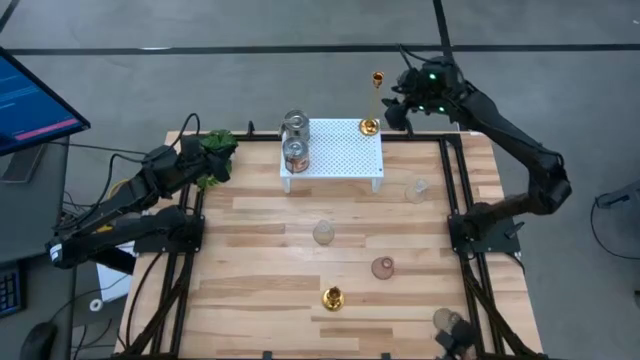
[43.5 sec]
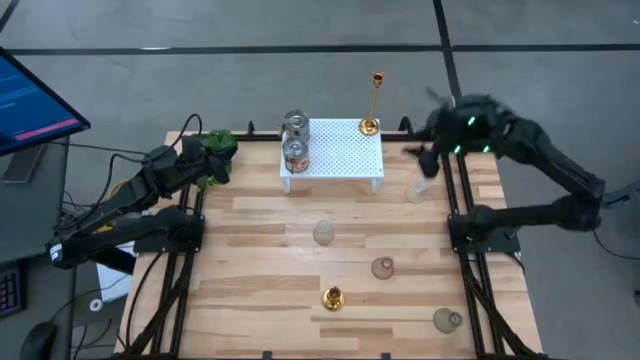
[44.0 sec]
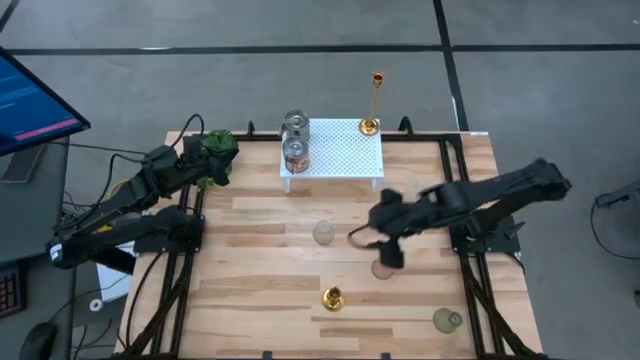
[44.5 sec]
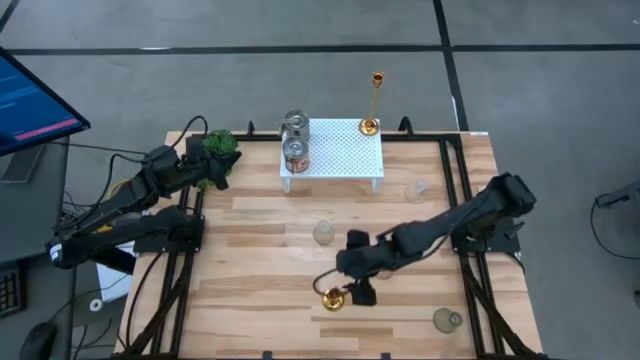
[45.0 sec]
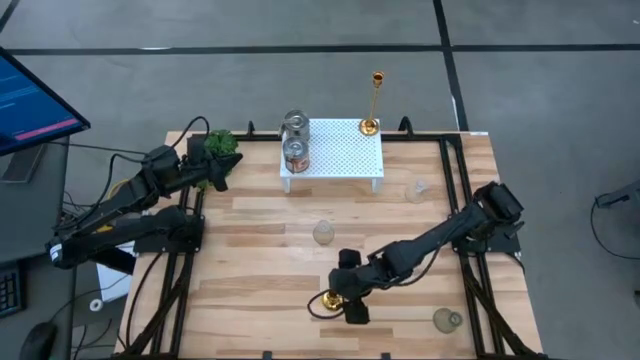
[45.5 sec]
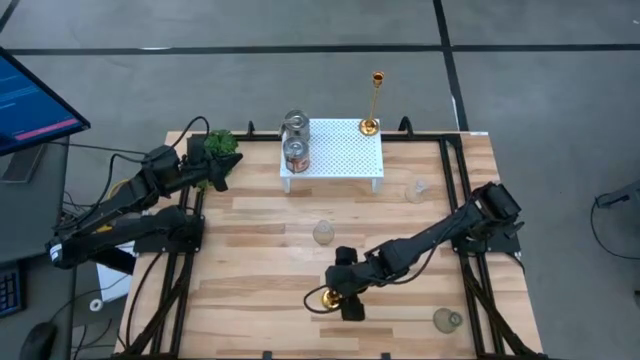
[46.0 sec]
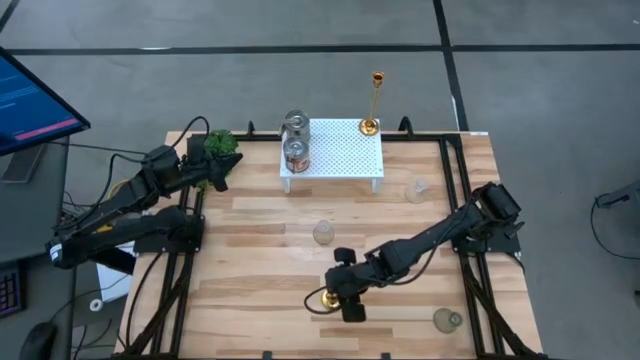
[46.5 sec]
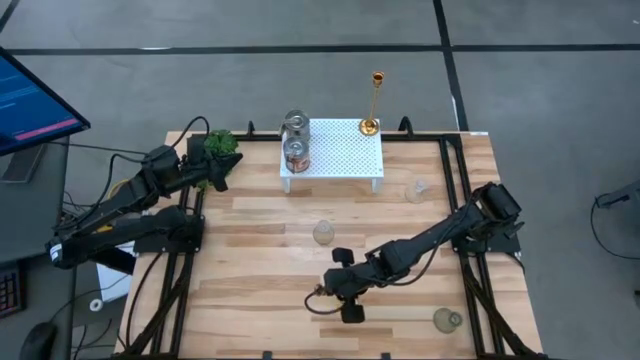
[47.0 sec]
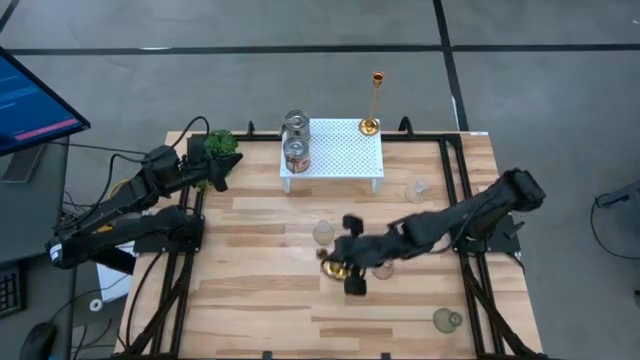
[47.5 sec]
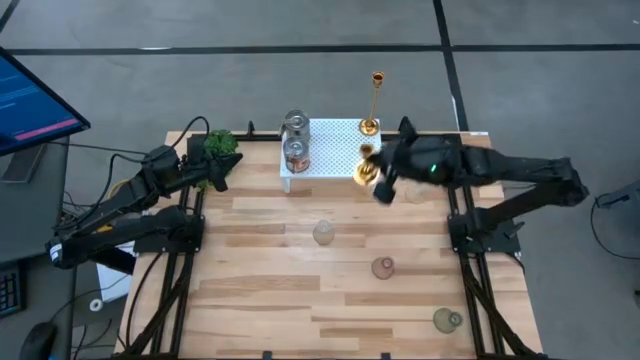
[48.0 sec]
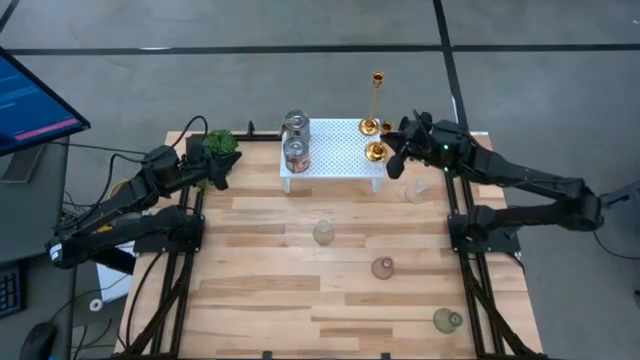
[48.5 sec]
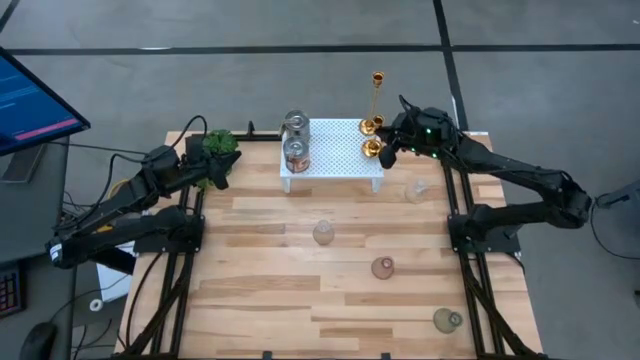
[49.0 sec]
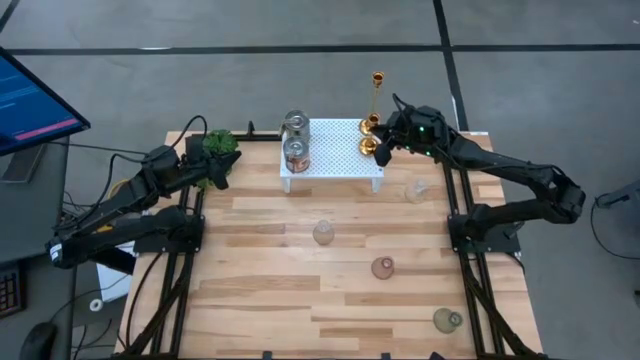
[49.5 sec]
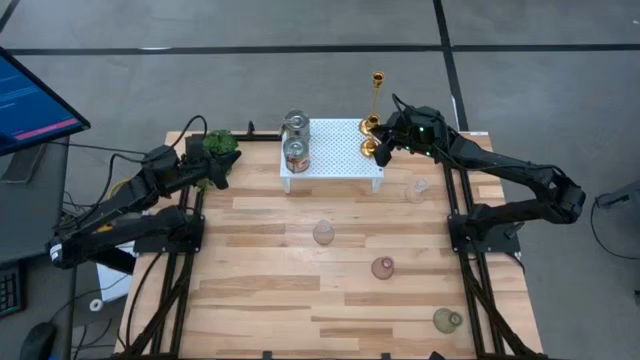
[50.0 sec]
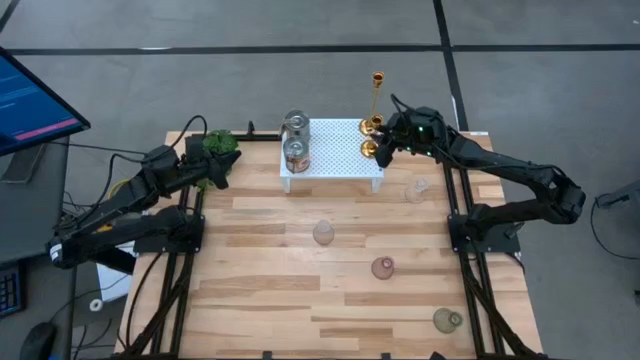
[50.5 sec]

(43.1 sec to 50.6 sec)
Task: Pick & Place candle stick holders
Put the gold candle holder on the shelf

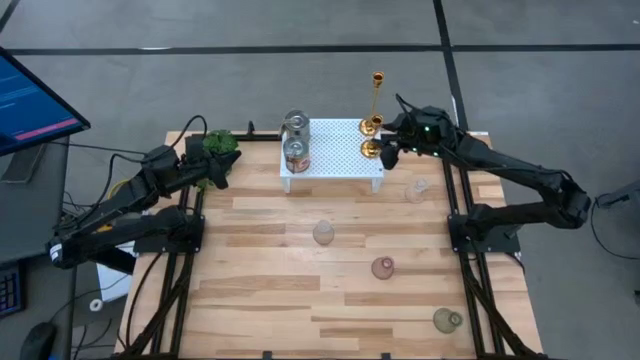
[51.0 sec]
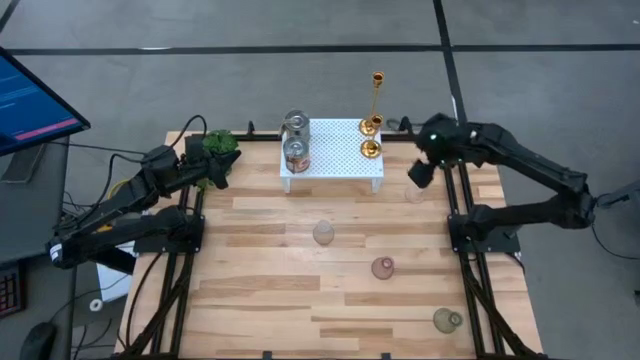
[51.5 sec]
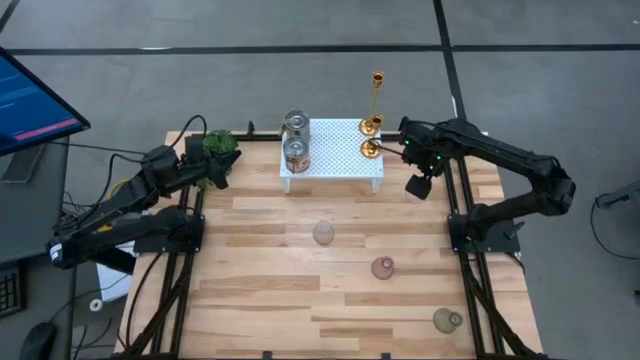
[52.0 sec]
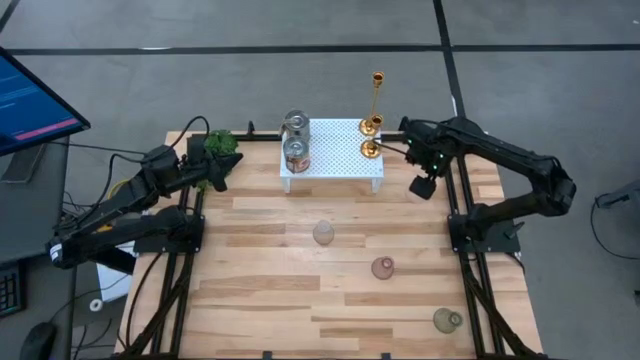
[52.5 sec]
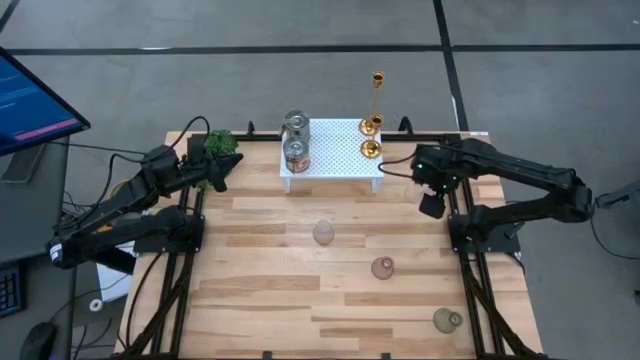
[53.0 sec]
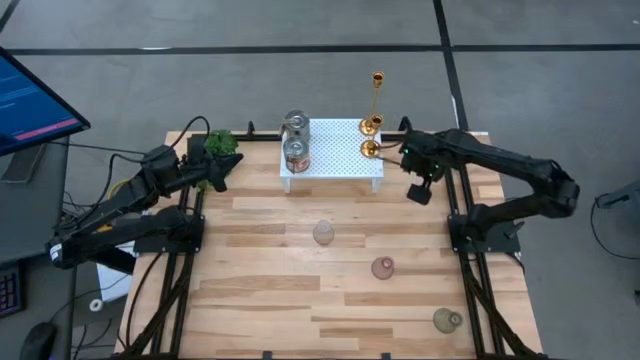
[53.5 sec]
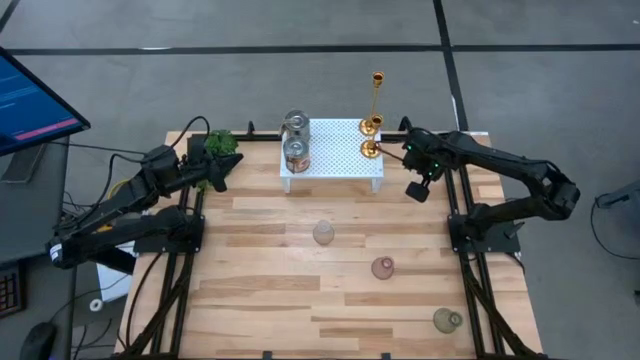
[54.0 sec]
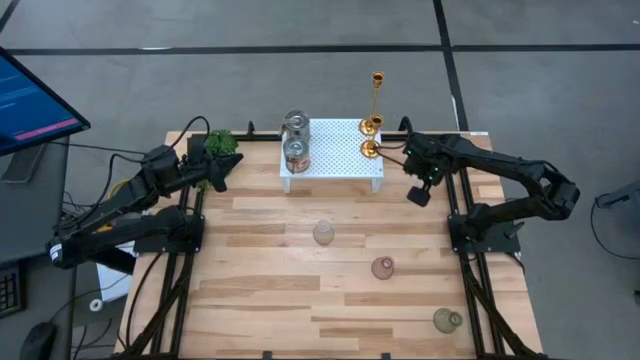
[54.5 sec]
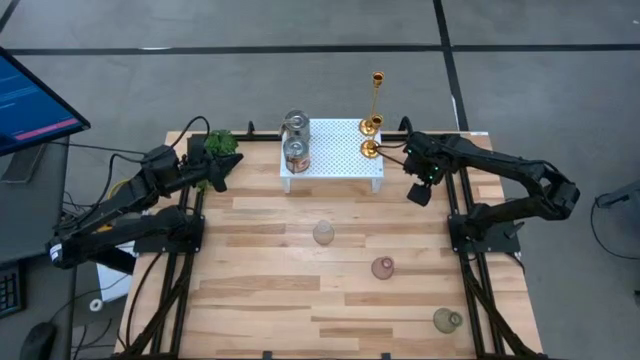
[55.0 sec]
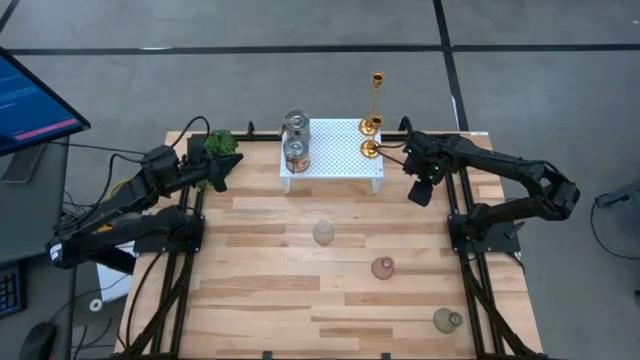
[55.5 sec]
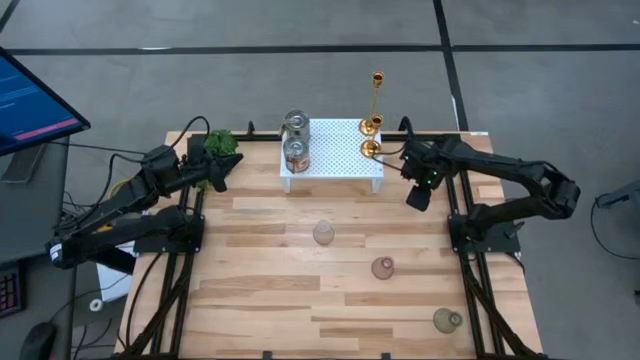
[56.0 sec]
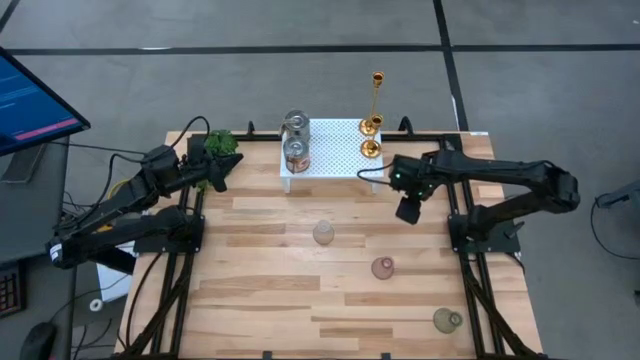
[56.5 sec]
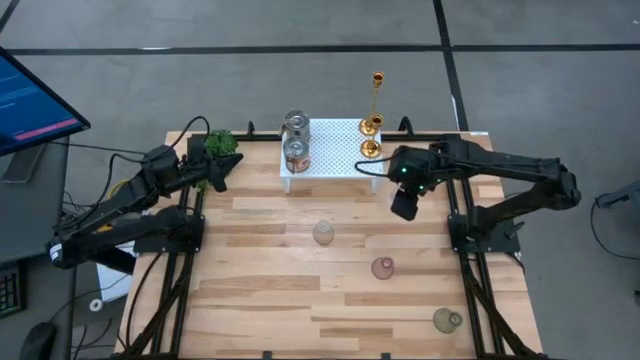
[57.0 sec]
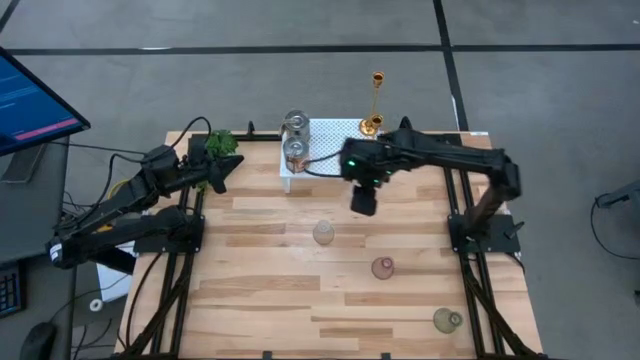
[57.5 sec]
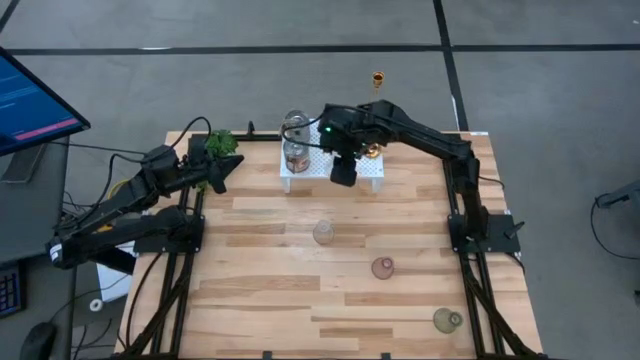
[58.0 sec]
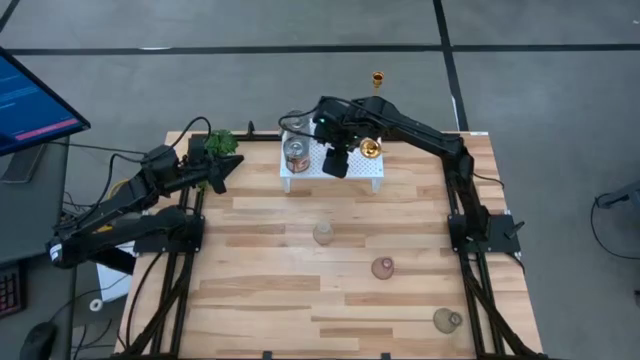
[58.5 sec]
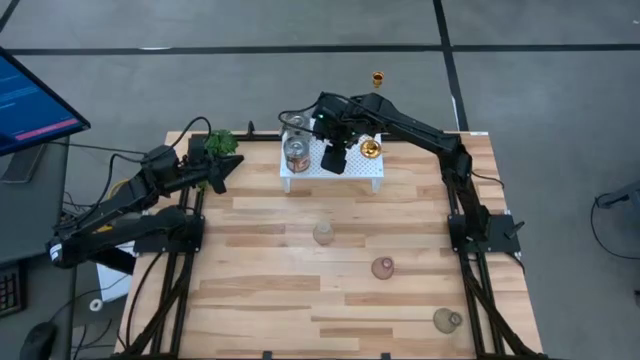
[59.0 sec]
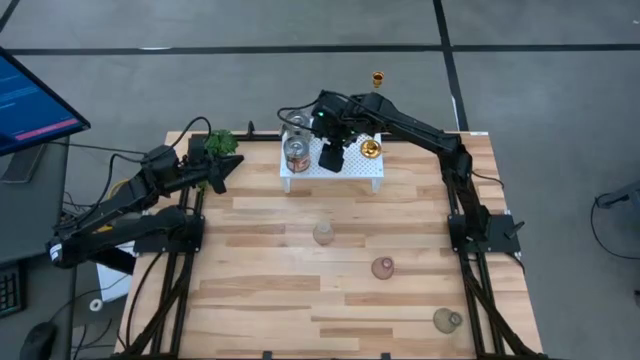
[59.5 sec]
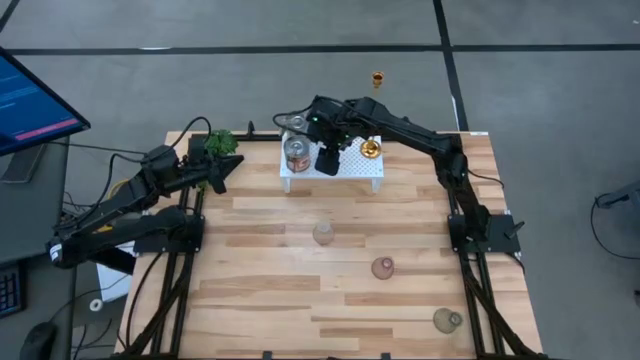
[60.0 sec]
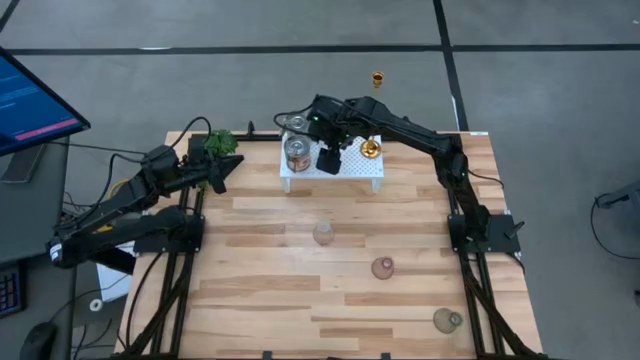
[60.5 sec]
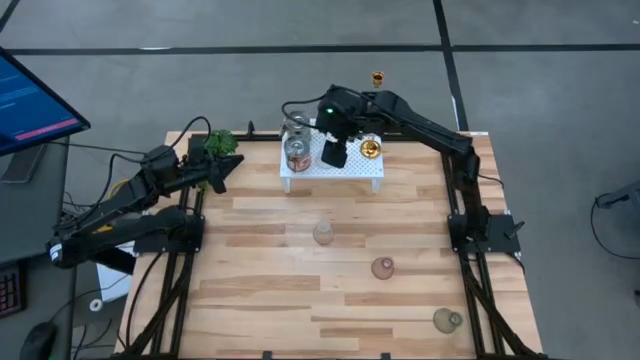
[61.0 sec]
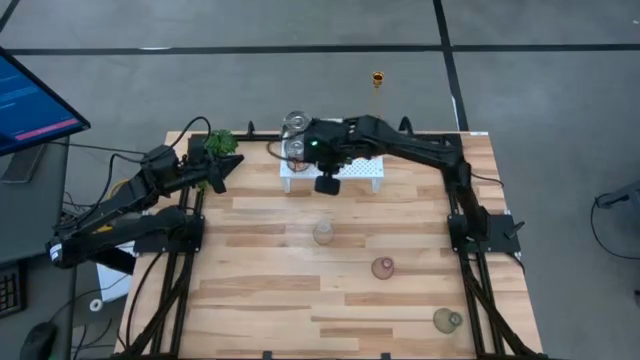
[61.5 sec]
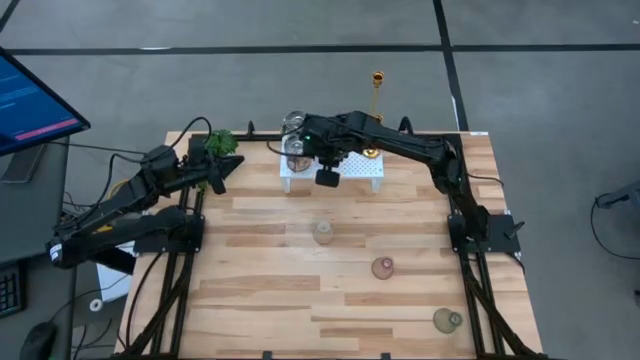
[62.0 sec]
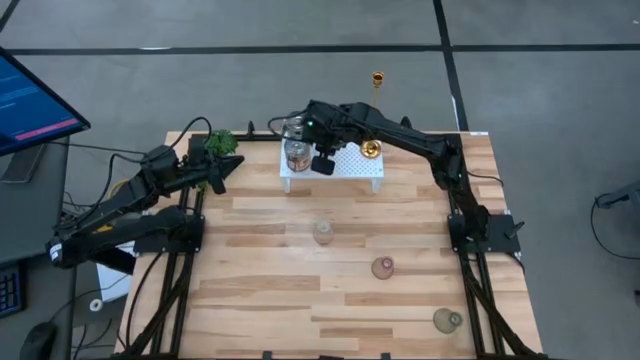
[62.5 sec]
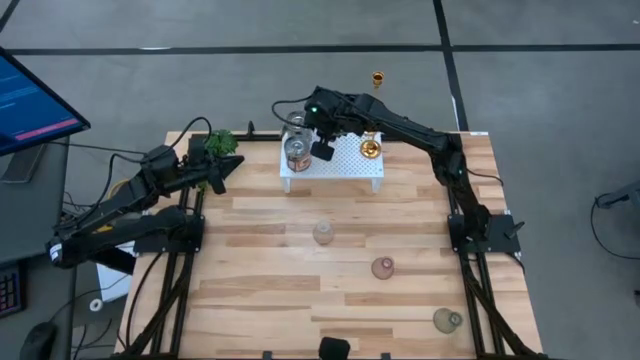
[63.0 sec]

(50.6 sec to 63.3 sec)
Put the top transparent candle holder on the shelf
